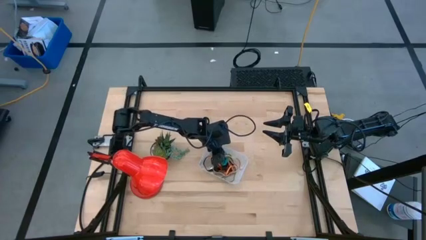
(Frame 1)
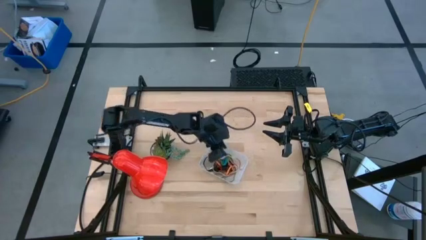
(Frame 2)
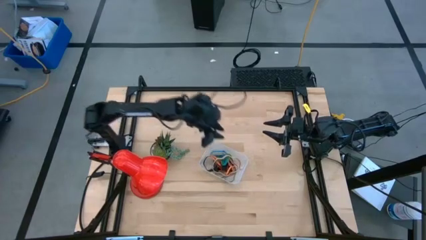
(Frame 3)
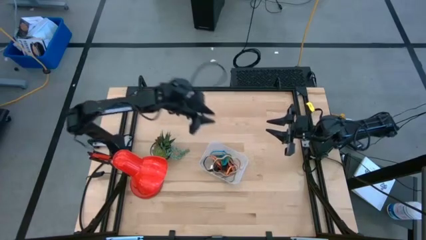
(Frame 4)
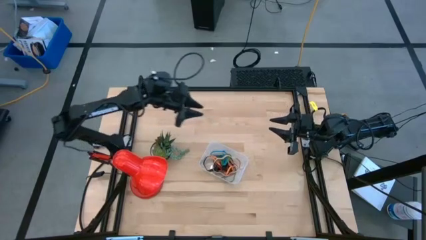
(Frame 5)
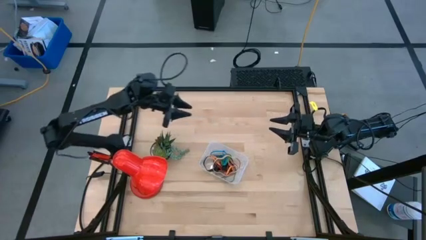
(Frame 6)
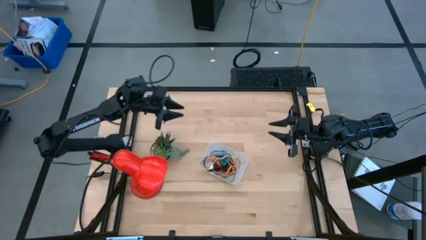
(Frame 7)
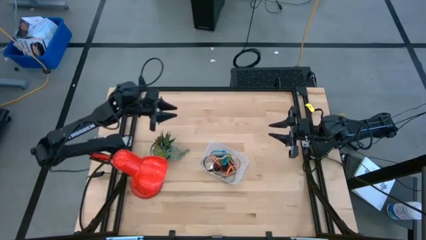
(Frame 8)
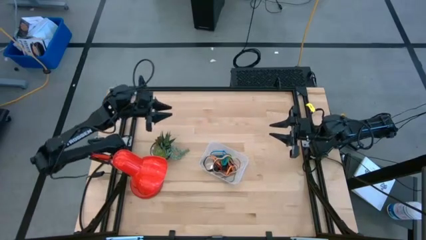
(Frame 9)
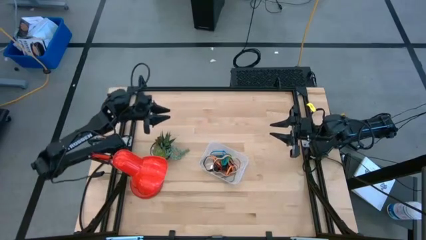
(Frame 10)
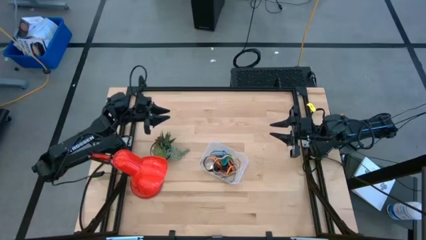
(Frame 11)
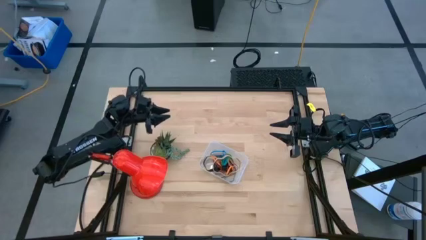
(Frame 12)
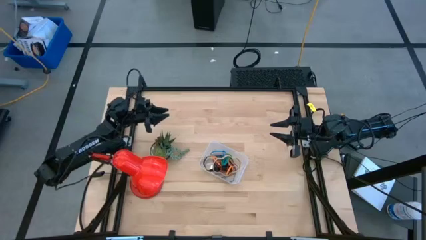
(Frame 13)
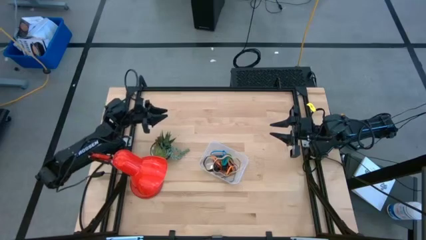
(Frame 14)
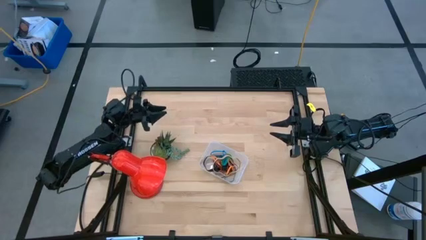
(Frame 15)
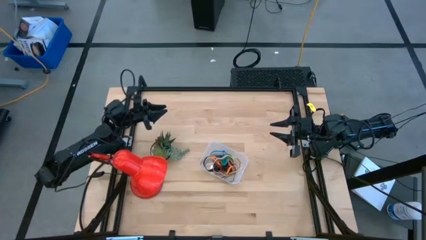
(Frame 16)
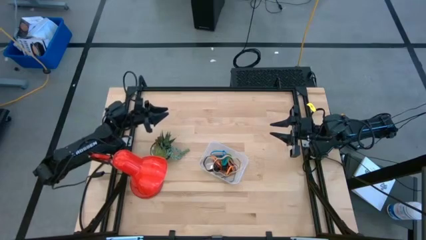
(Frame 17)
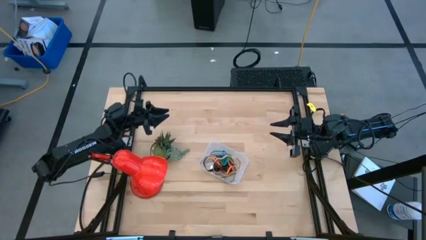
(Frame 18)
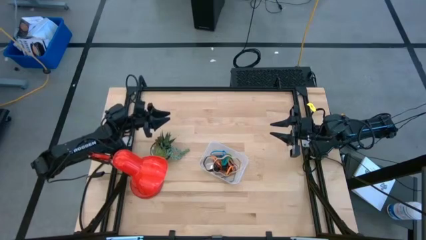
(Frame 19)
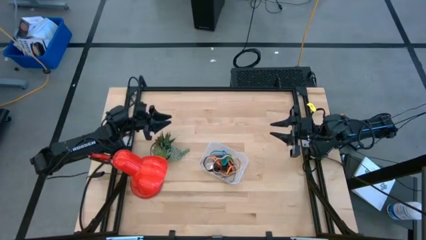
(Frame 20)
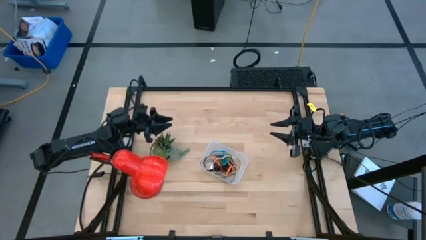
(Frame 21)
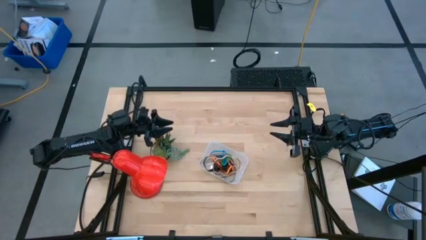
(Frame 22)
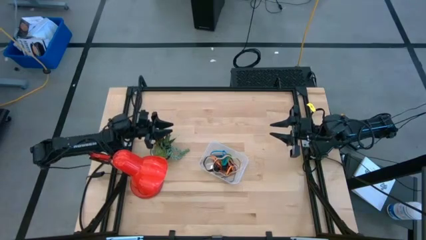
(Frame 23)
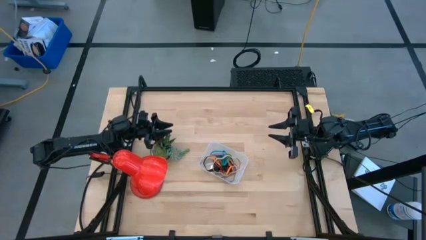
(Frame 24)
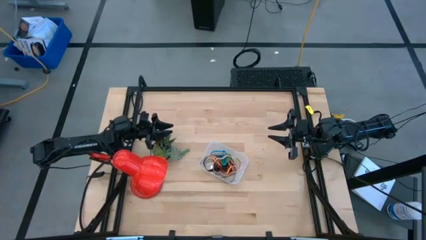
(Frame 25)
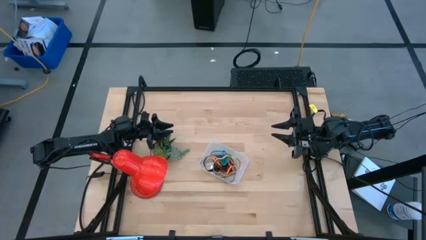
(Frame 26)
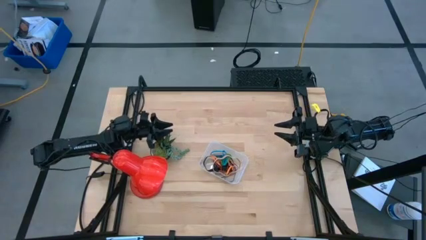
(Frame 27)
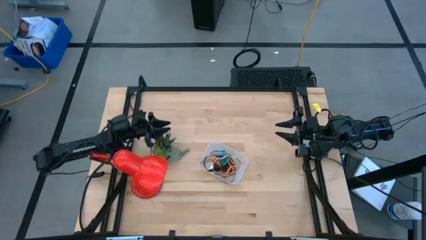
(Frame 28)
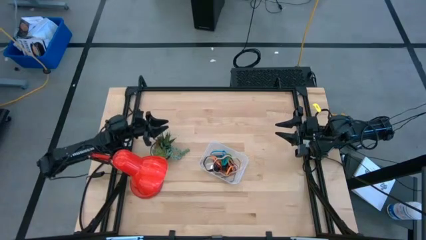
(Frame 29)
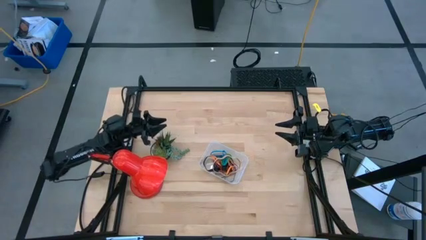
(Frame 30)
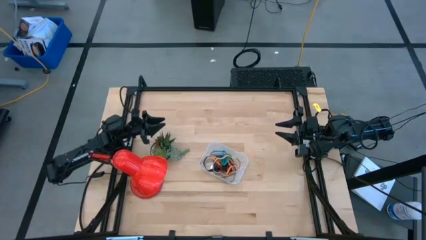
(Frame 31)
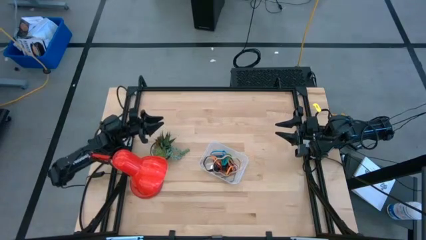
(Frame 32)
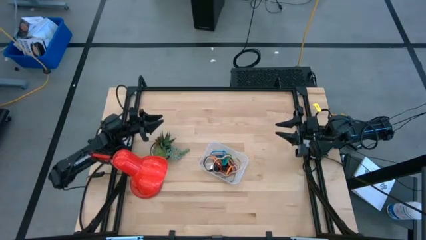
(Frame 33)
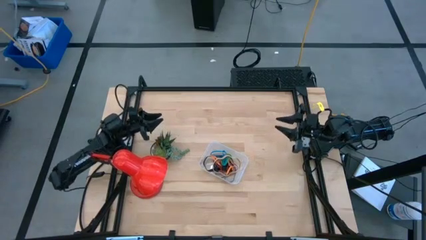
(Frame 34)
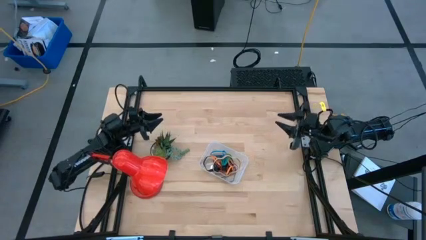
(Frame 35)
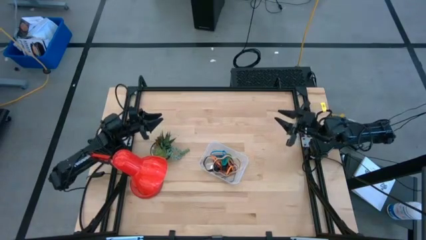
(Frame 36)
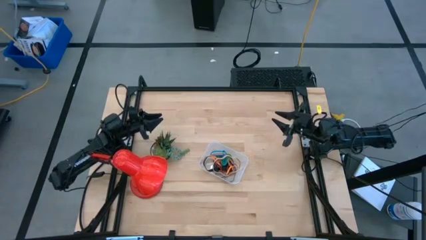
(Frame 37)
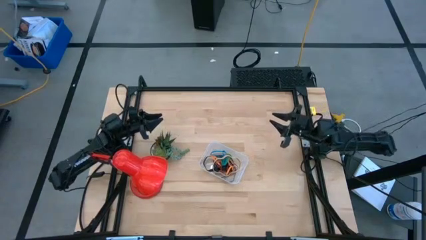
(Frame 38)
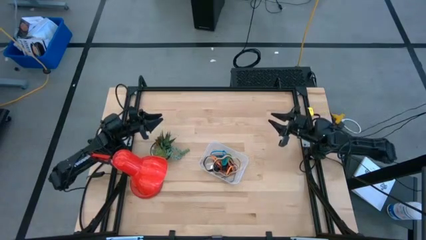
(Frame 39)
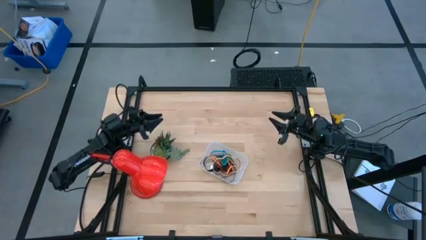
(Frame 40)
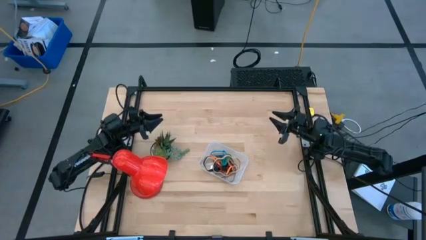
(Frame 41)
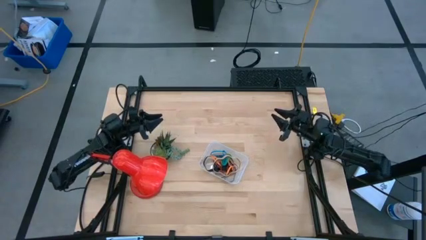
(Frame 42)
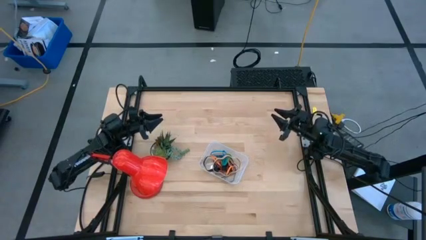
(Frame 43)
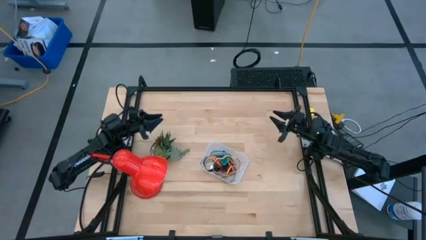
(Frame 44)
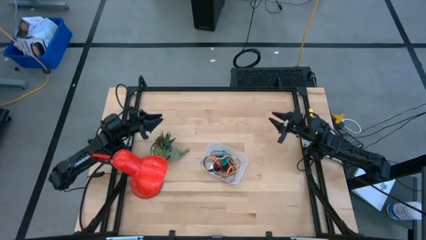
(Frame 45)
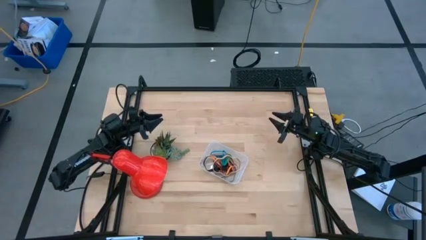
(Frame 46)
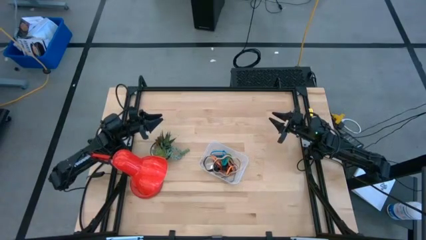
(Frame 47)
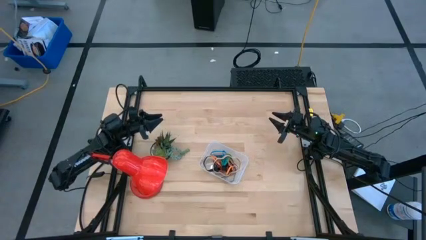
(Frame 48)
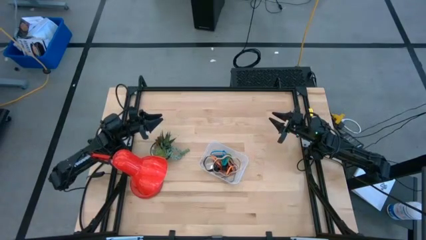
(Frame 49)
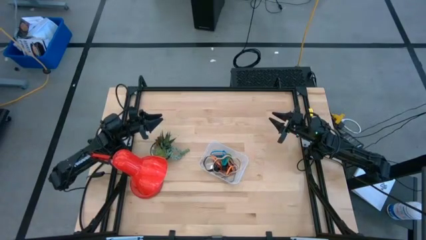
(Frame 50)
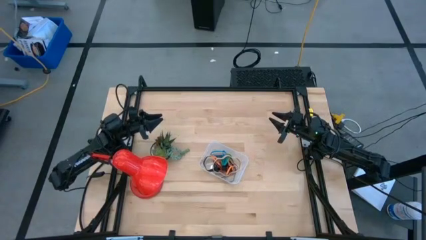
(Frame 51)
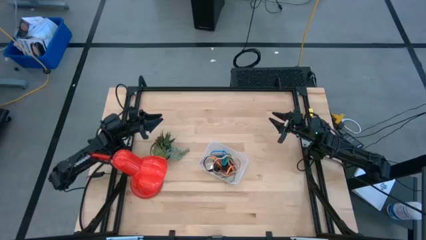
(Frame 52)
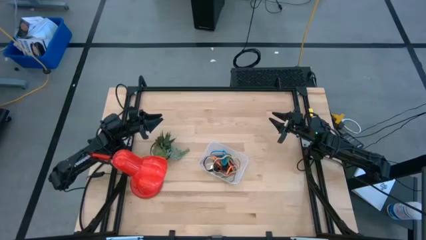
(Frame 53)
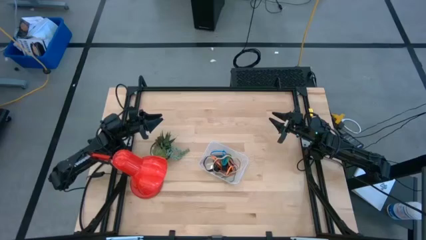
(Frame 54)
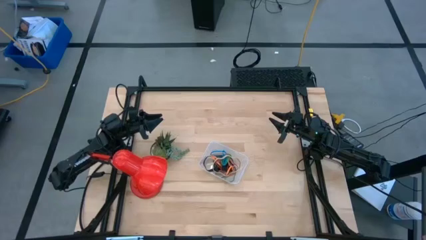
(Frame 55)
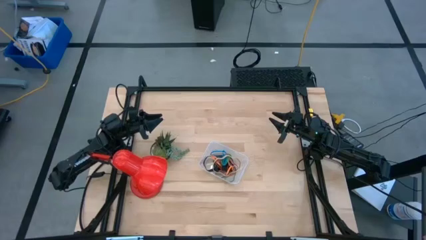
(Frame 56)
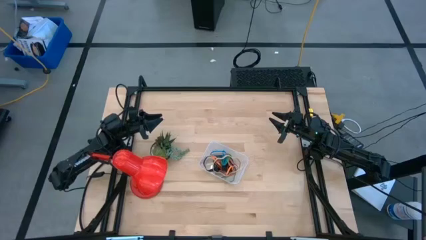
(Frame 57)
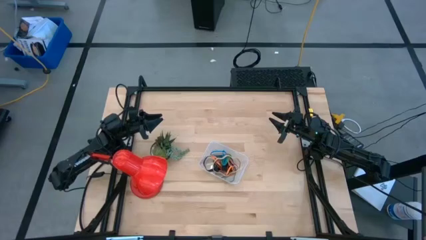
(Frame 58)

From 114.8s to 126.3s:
Task: Pick and place rubber bands into bin
Return to home position

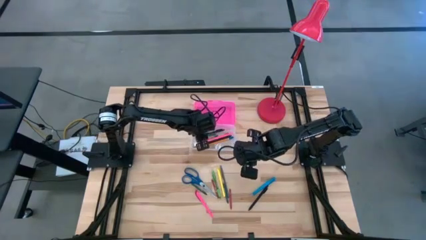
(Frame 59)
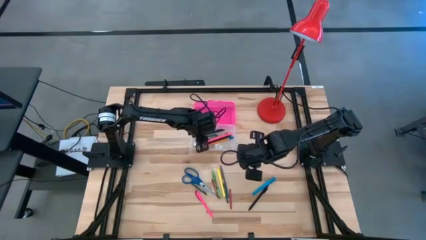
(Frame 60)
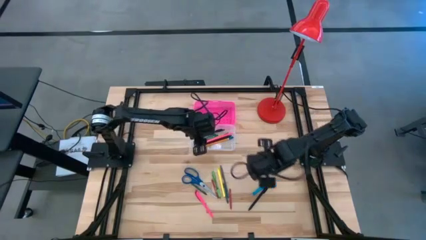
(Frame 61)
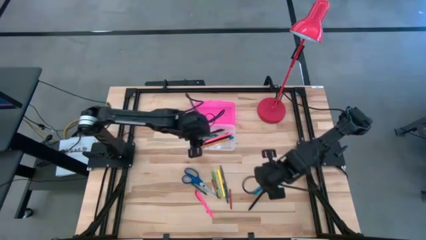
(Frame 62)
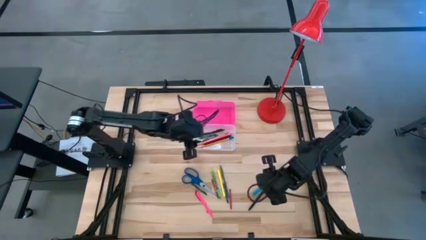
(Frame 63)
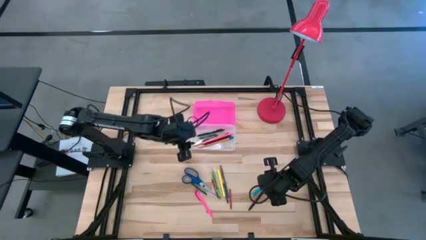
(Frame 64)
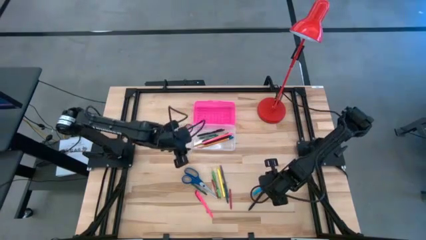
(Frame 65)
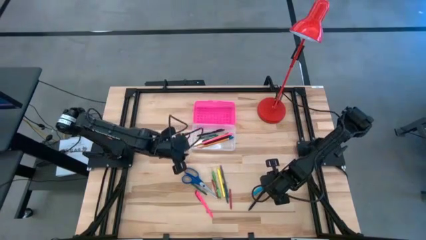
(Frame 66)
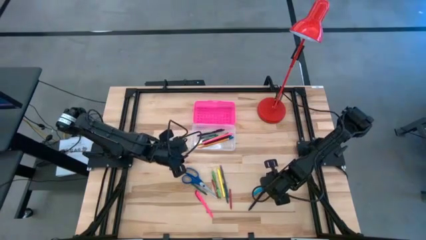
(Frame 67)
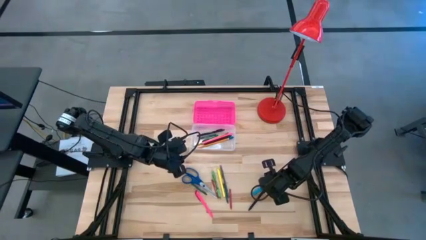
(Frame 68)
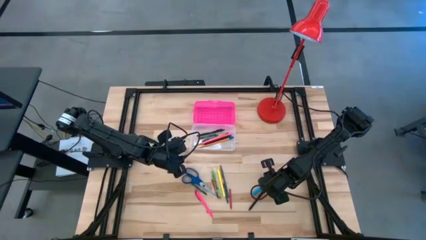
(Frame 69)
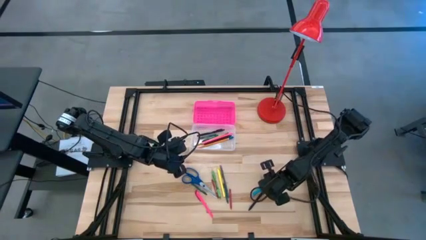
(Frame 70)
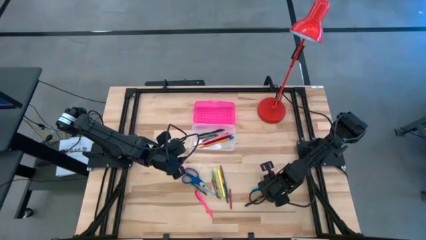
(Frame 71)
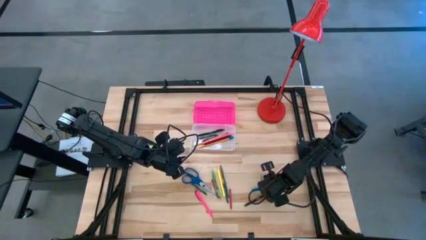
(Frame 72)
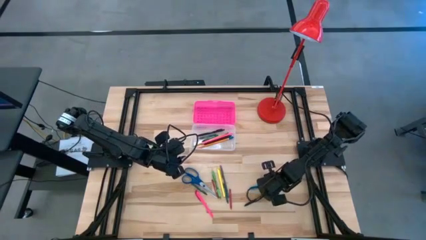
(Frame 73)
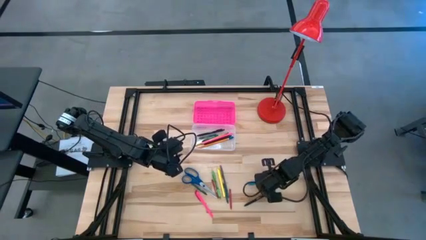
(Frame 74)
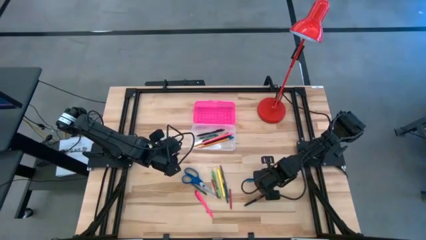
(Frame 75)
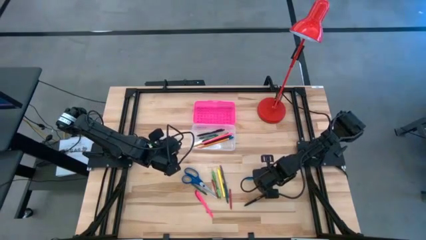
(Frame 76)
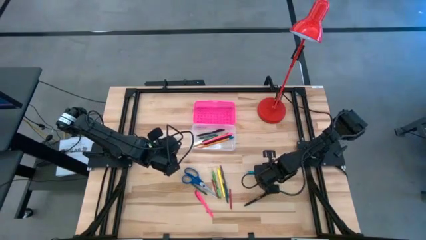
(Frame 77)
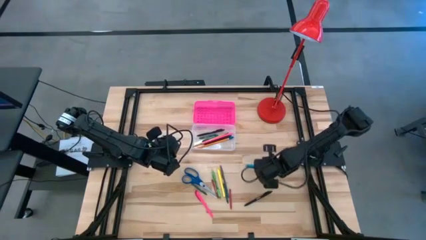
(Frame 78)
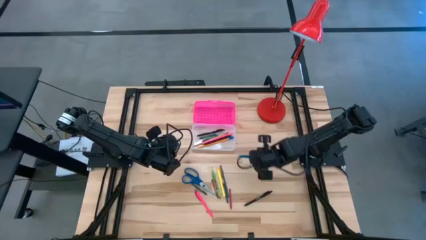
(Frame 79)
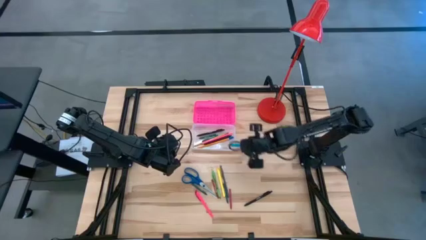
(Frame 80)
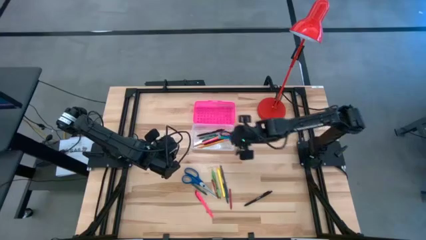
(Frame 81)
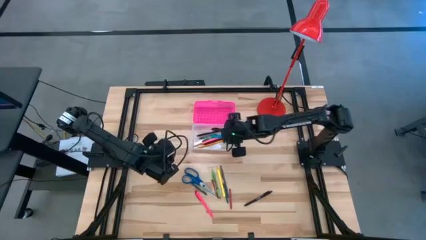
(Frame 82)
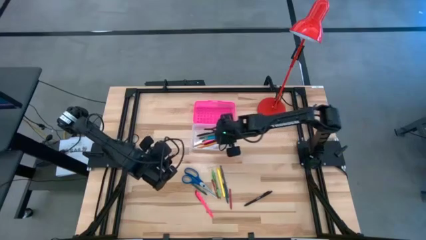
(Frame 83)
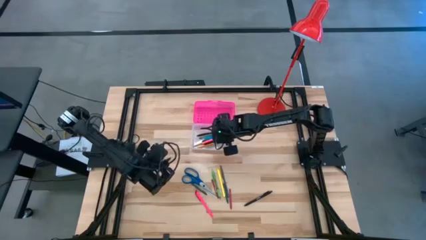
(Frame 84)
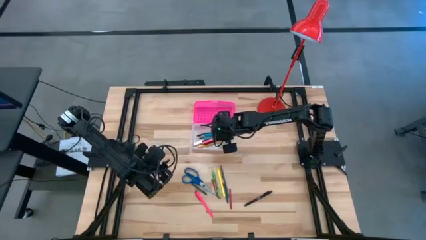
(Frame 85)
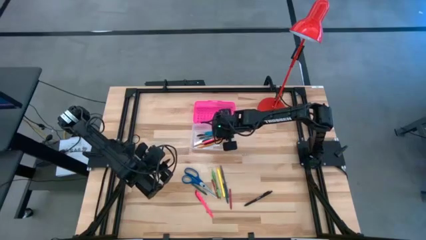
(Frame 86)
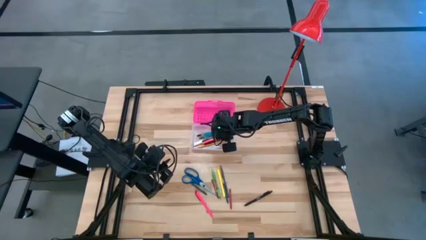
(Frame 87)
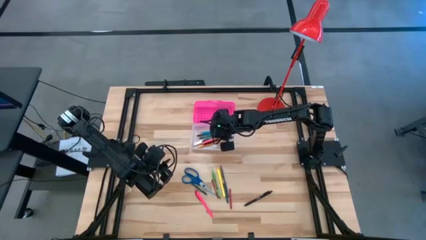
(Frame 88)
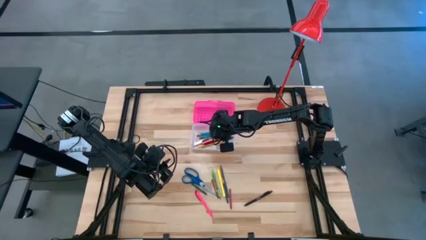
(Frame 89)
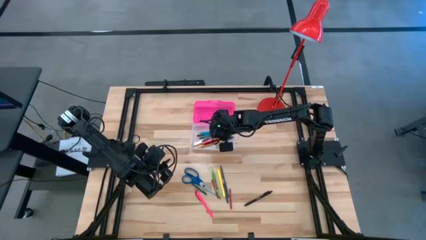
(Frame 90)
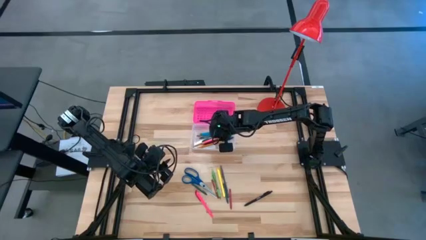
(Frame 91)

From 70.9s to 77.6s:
Task: Pick & place school supplies into a supply box
Put the blue pen into the pink supply box
